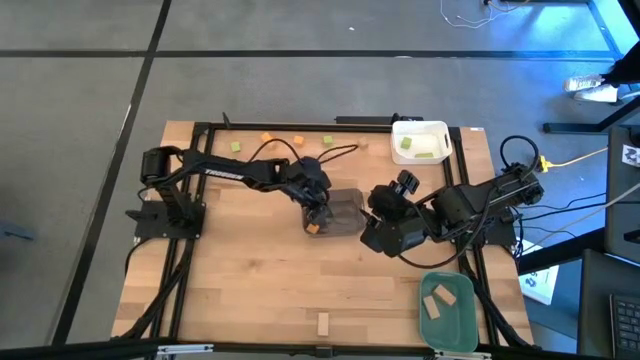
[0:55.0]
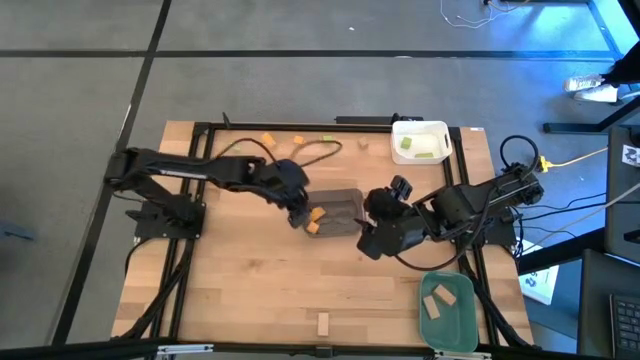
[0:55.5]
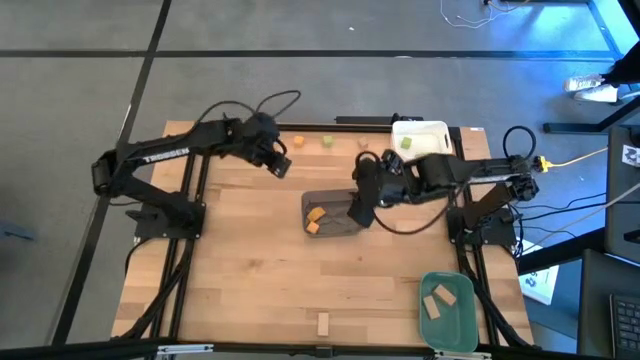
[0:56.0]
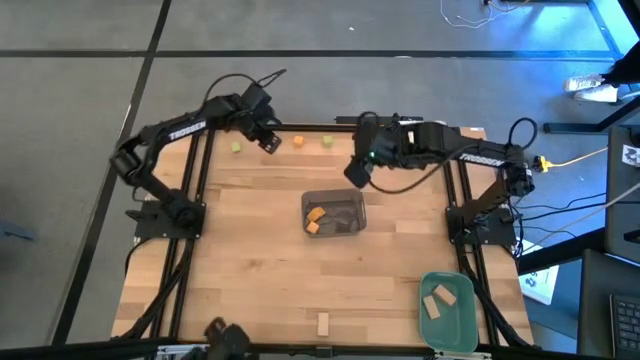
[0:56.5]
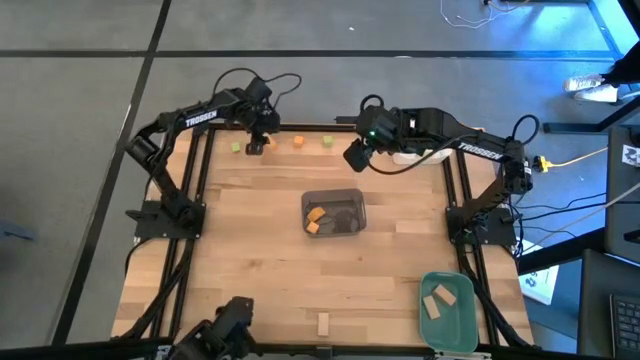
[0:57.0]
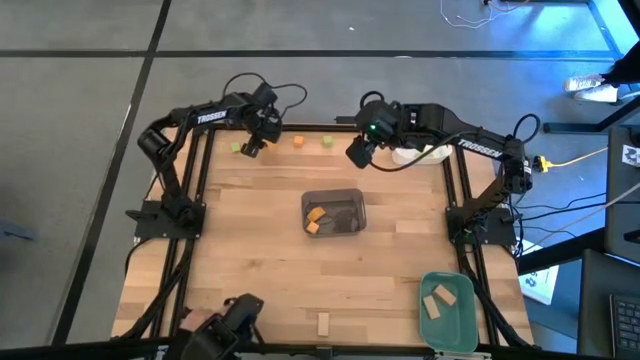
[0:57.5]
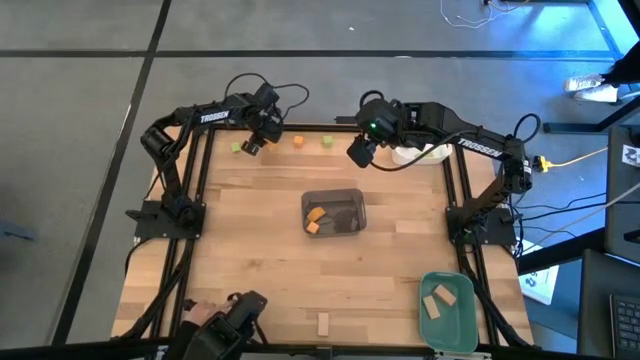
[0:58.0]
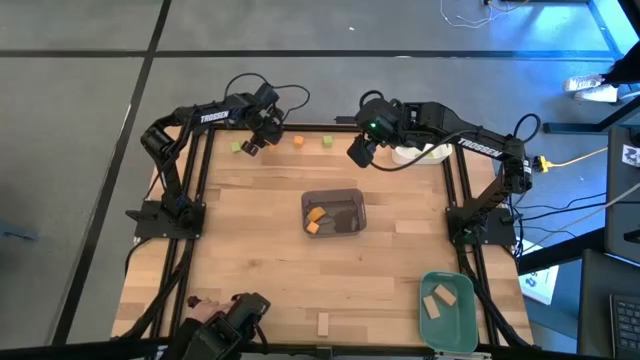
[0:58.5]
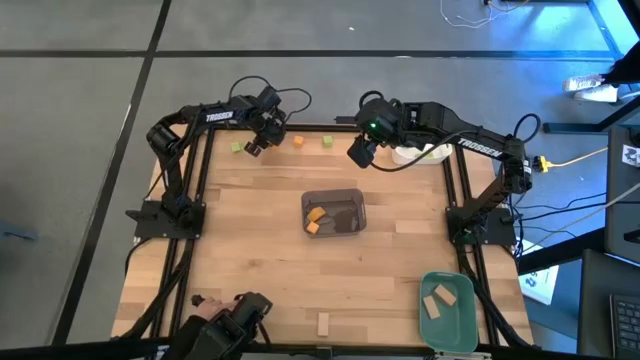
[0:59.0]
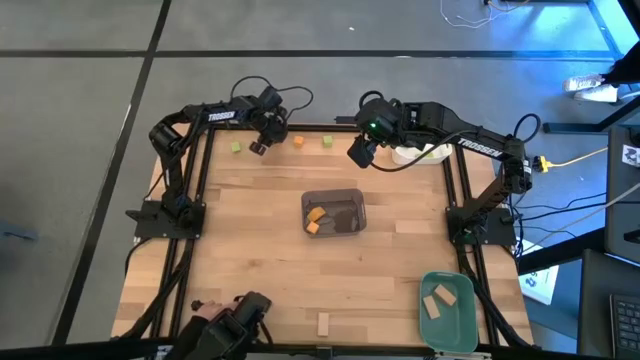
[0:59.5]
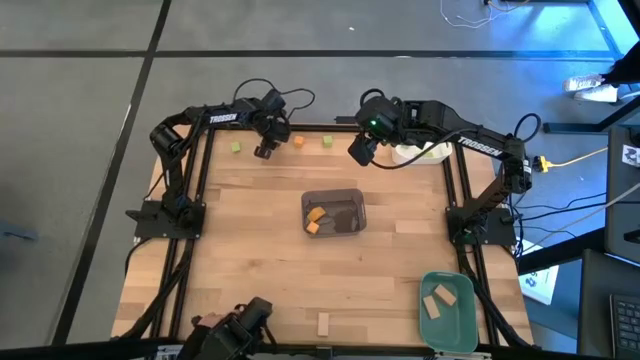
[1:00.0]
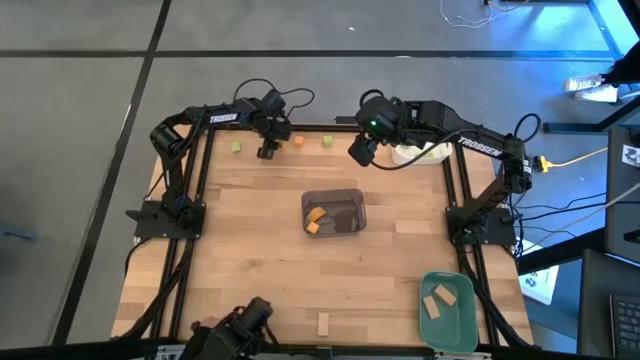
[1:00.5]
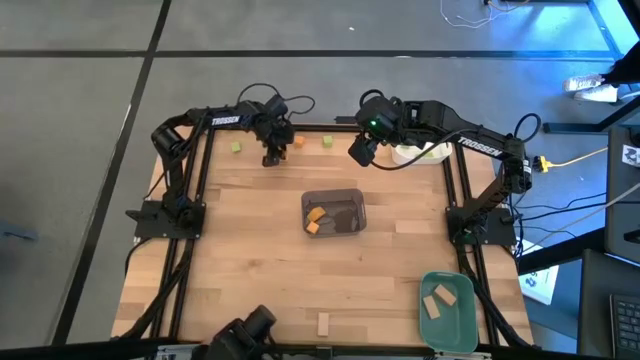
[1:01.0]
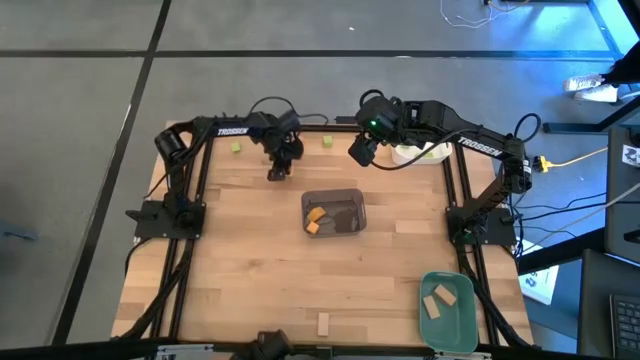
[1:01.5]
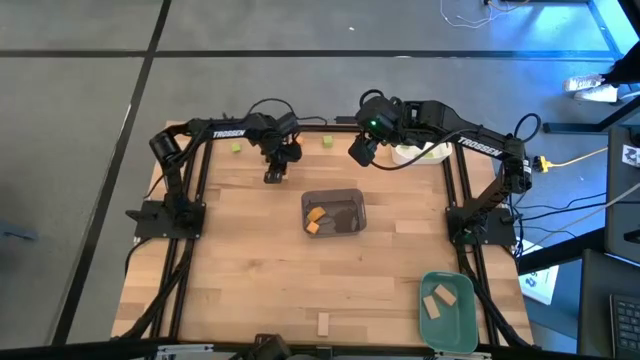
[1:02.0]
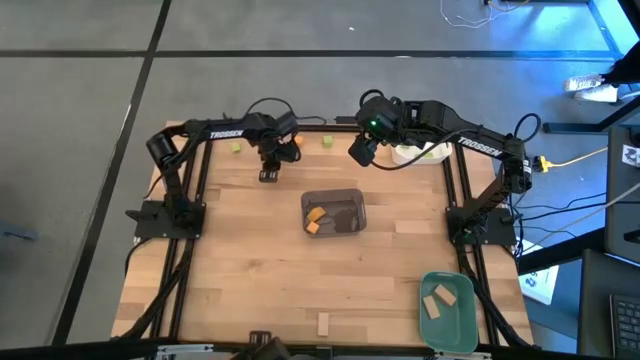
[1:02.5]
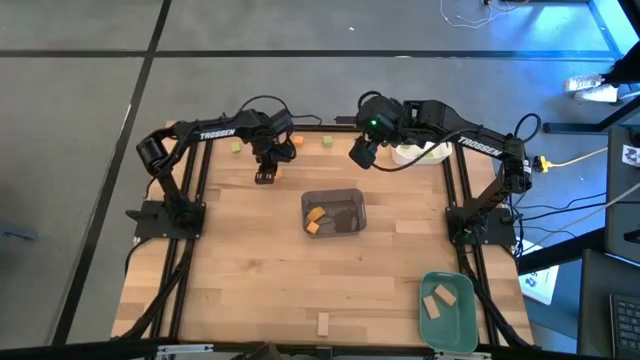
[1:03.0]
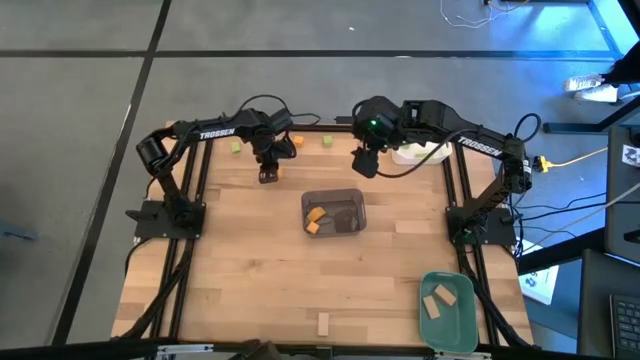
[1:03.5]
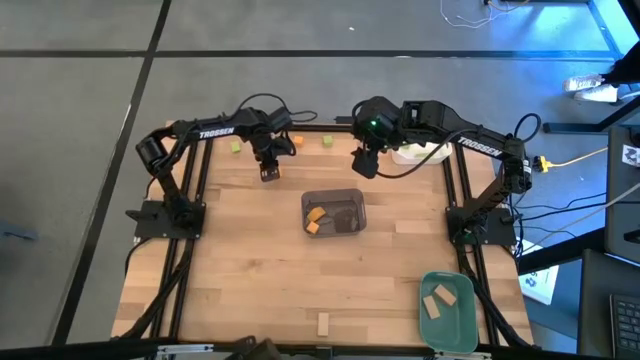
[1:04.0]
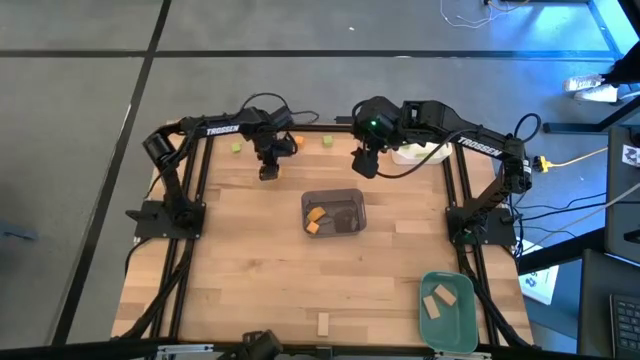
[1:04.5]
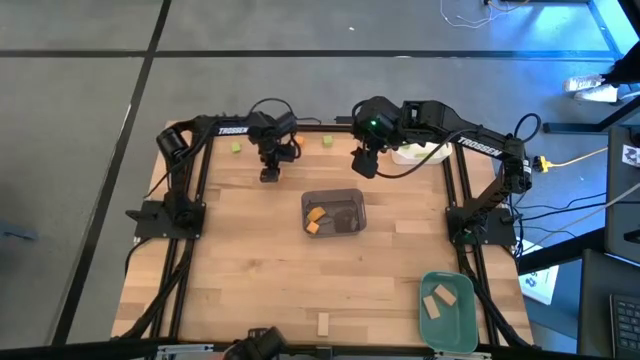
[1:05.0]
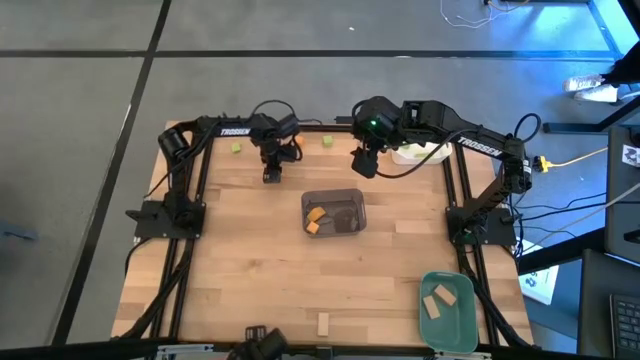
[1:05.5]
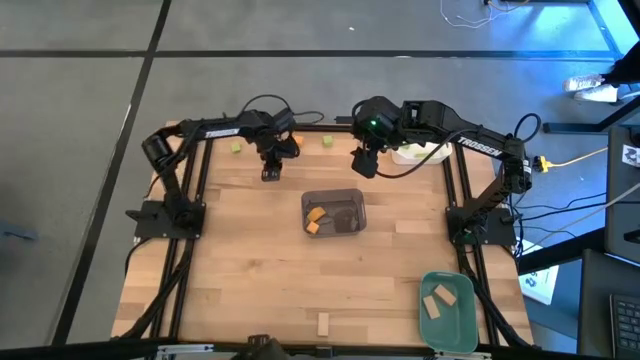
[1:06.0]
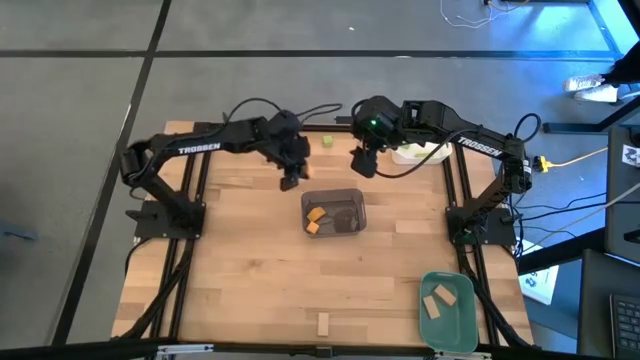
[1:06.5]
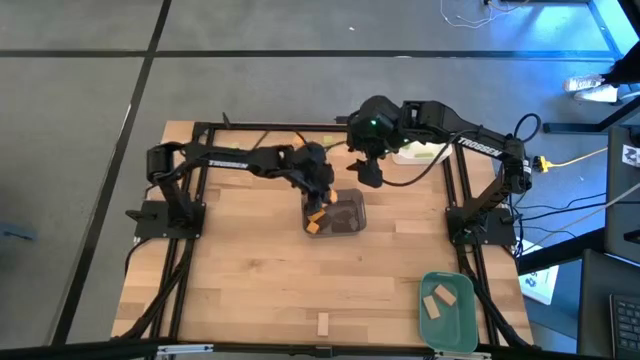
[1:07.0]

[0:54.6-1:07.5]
Task: Sort & place blocks by color
Put the orange block into the black bin

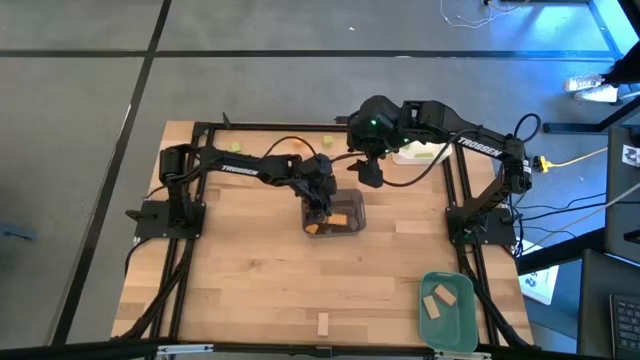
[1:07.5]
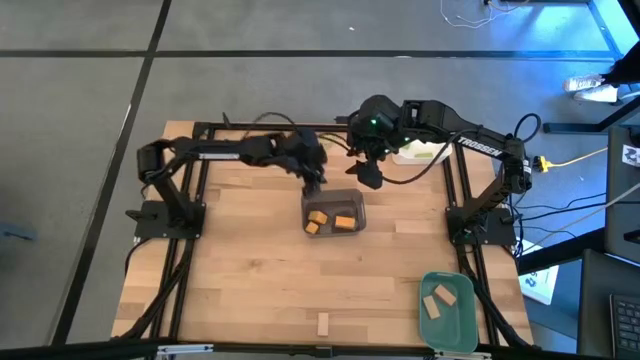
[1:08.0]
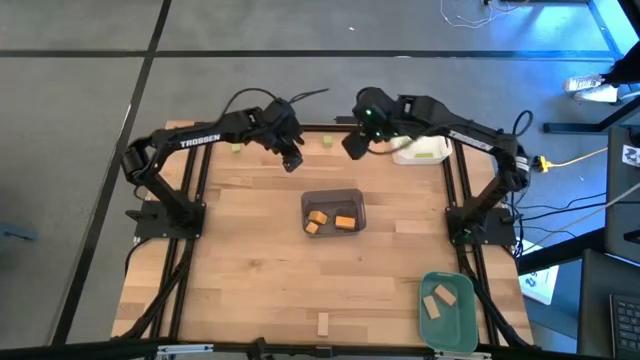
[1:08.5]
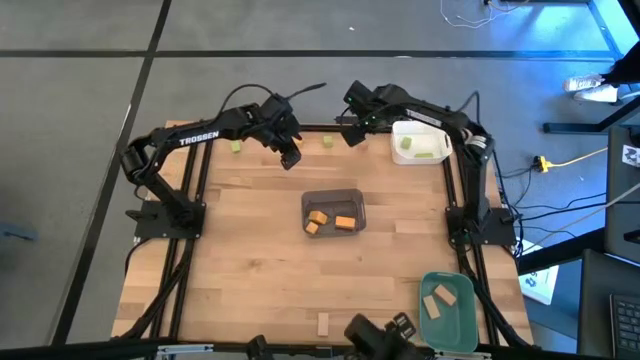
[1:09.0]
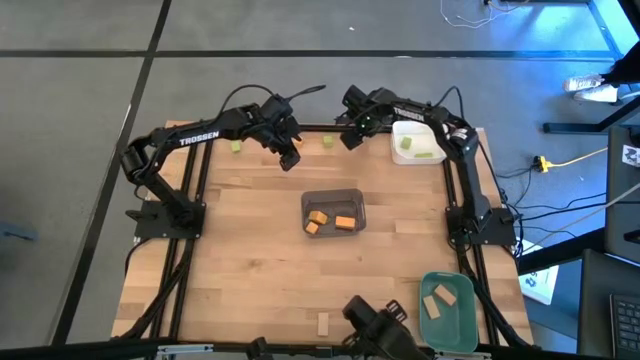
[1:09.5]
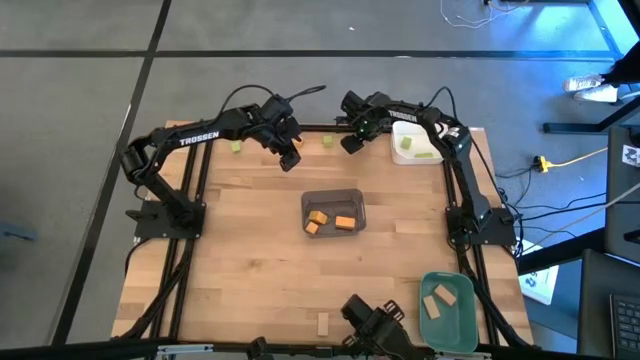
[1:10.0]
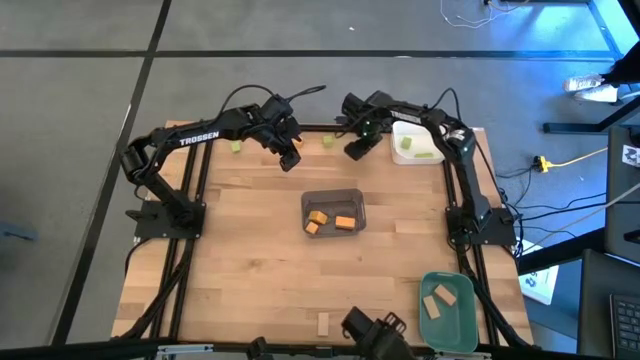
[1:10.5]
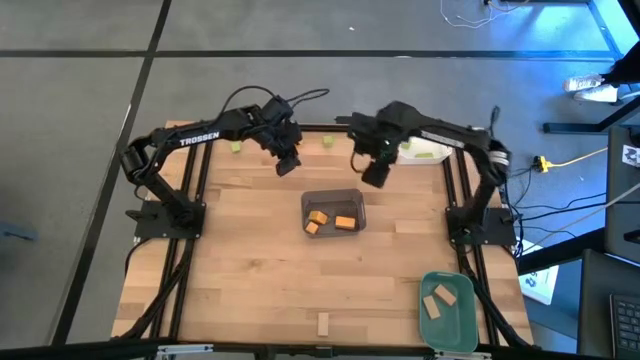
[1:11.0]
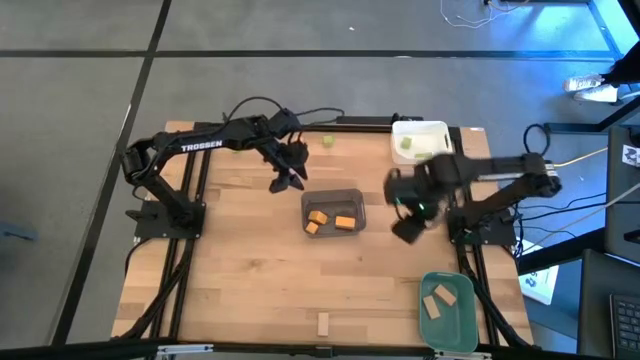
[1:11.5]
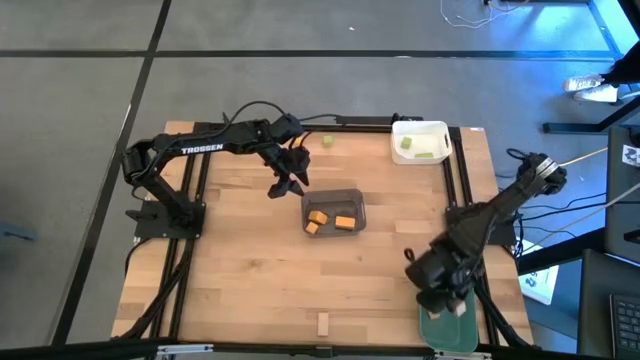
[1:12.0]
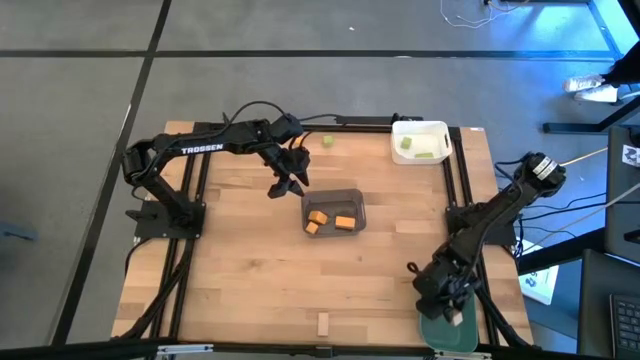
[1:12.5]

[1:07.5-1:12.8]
Put the brown block into the blue bin

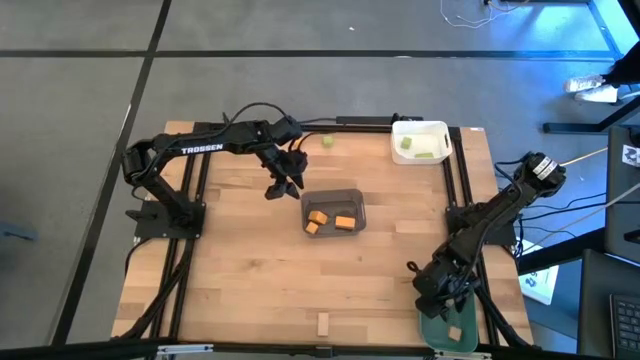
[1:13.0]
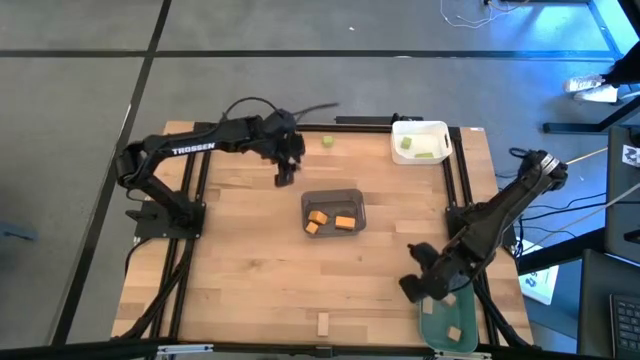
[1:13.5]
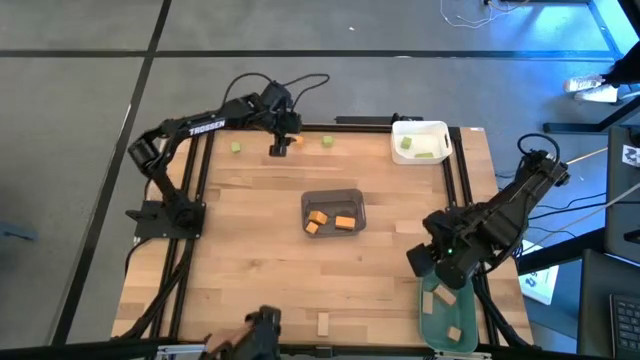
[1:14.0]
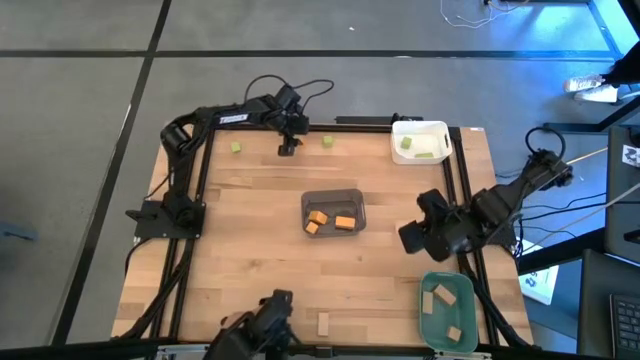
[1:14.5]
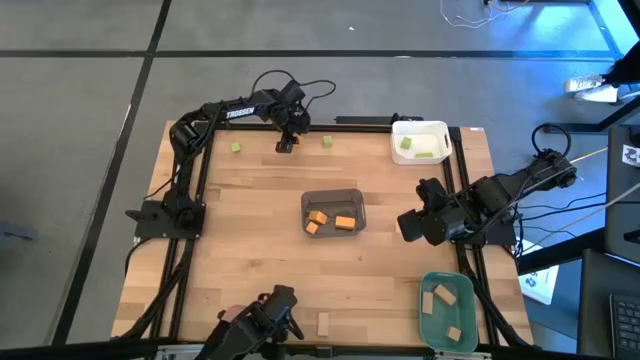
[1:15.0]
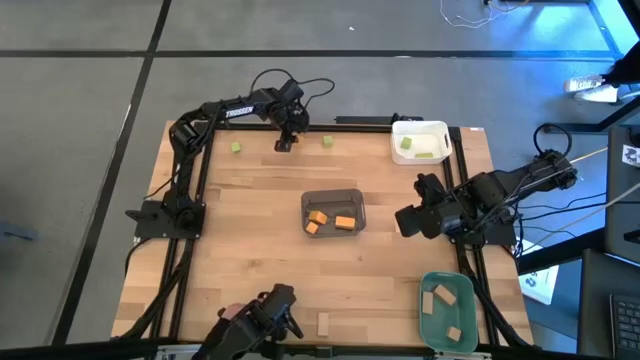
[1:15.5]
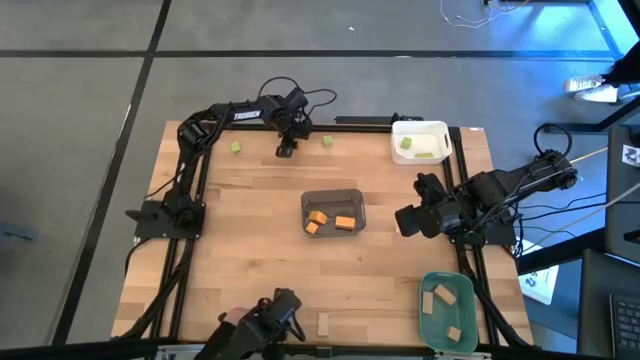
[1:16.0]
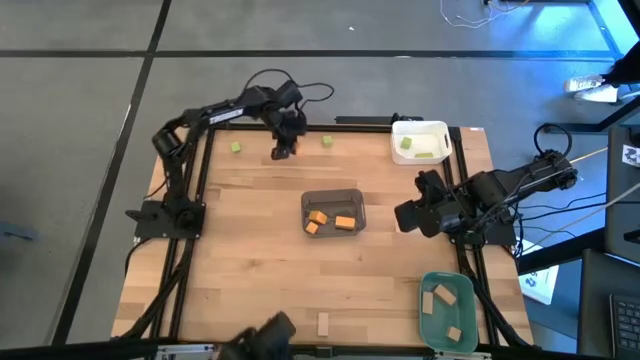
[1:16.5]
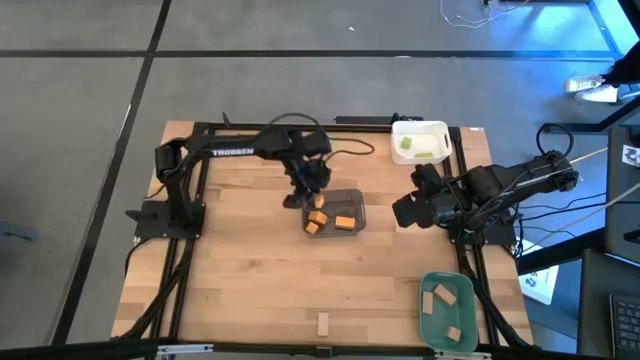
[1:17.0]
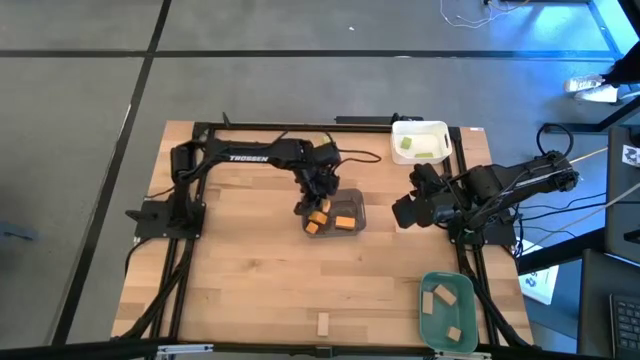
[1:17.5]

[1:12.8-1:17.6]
Put the orange block into the black bin
